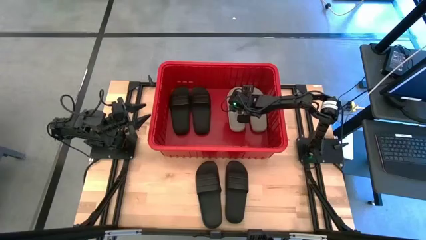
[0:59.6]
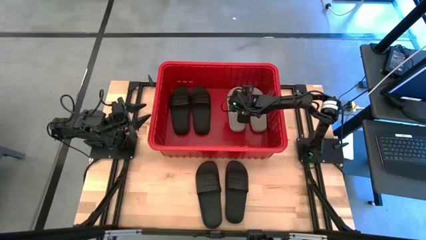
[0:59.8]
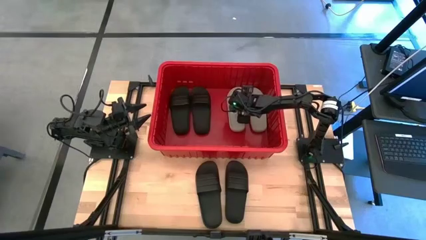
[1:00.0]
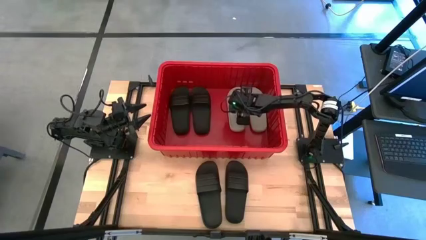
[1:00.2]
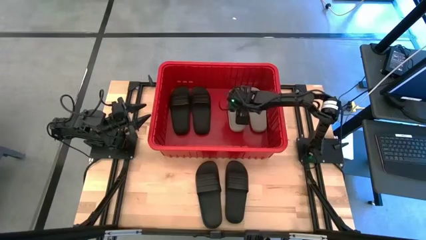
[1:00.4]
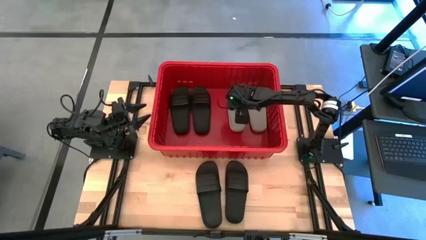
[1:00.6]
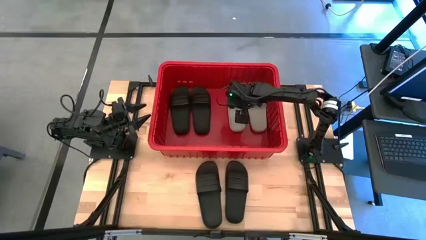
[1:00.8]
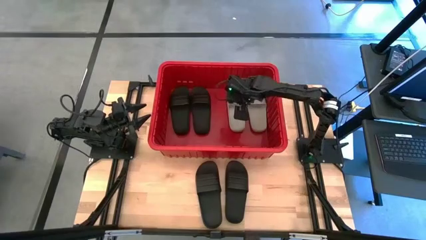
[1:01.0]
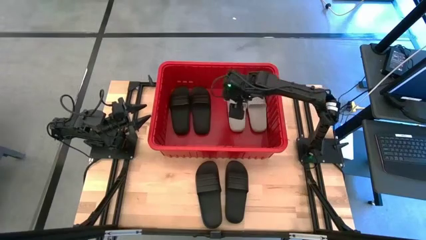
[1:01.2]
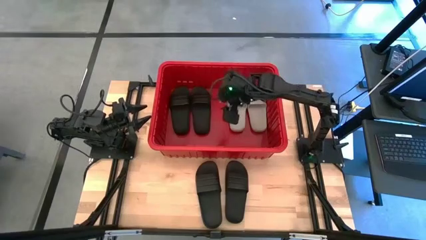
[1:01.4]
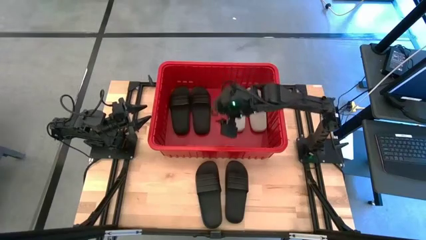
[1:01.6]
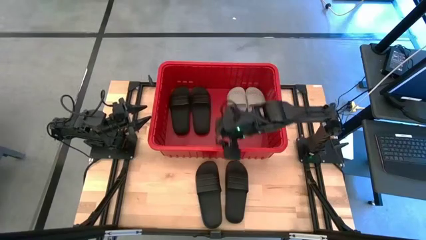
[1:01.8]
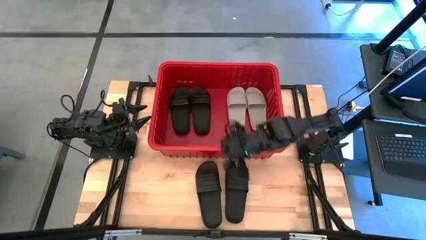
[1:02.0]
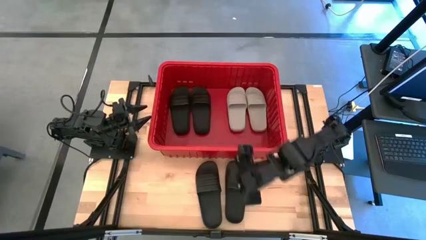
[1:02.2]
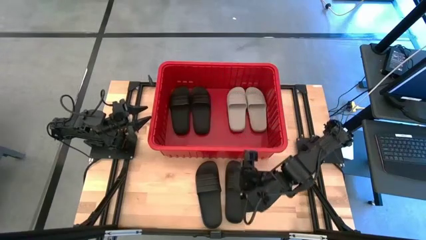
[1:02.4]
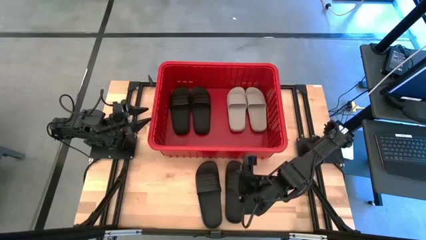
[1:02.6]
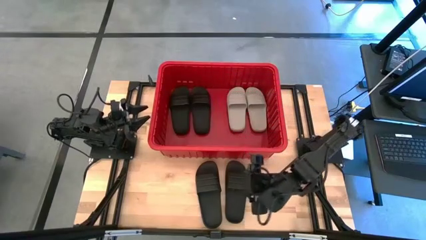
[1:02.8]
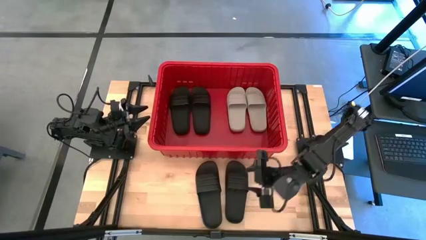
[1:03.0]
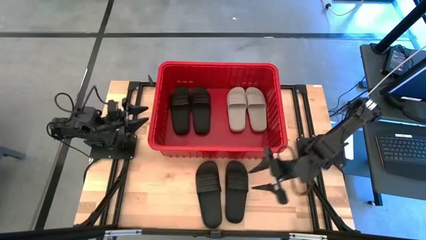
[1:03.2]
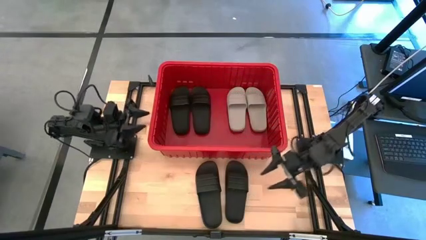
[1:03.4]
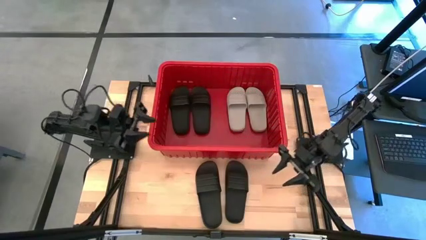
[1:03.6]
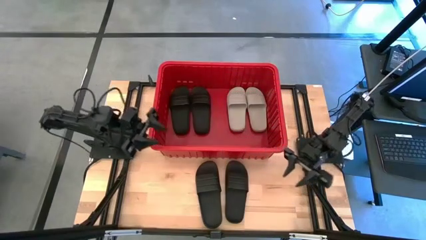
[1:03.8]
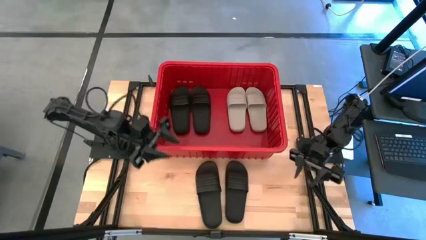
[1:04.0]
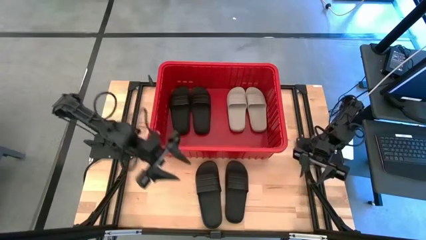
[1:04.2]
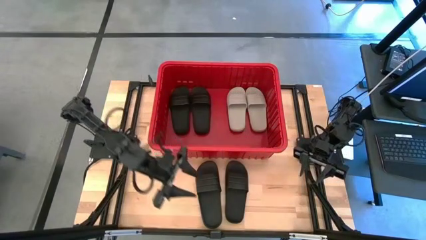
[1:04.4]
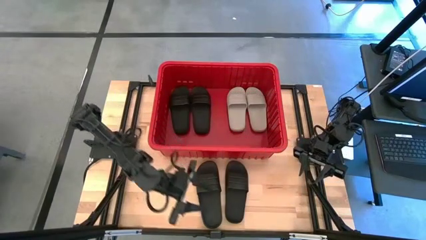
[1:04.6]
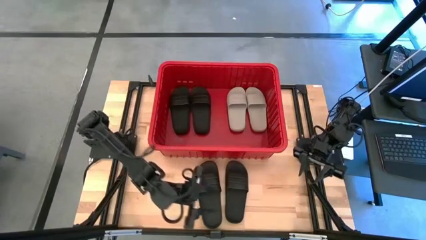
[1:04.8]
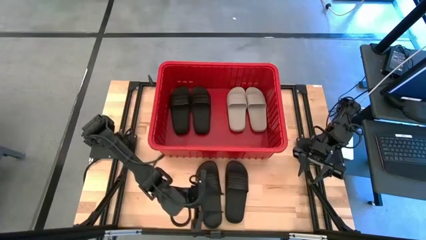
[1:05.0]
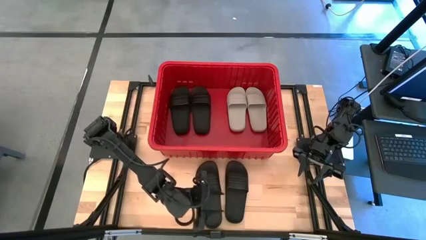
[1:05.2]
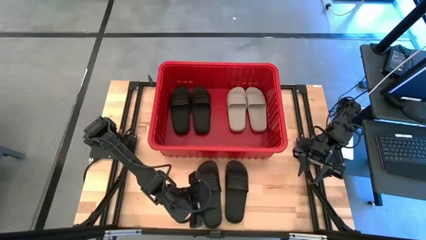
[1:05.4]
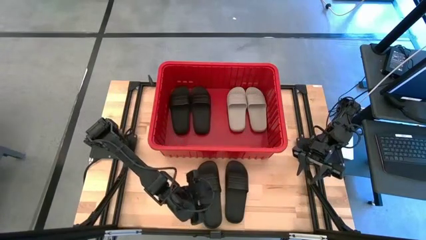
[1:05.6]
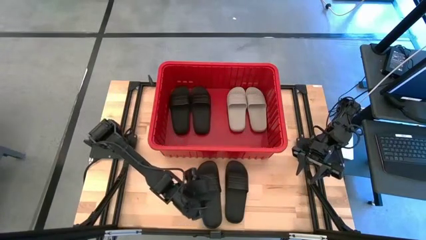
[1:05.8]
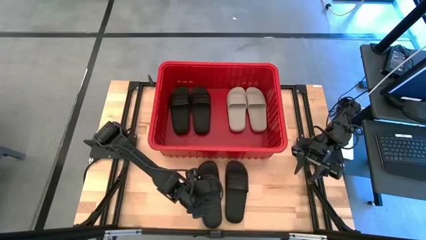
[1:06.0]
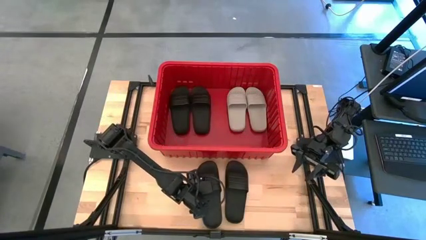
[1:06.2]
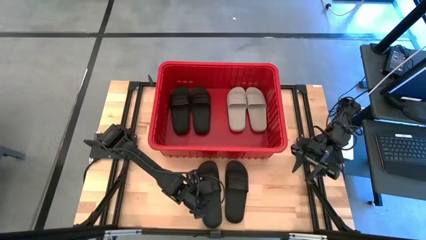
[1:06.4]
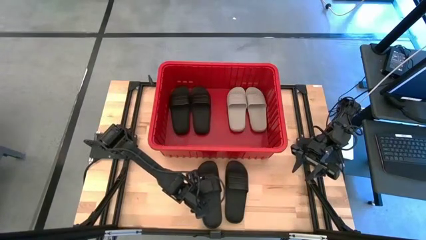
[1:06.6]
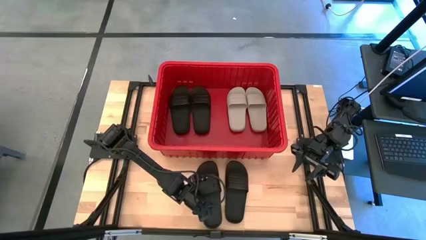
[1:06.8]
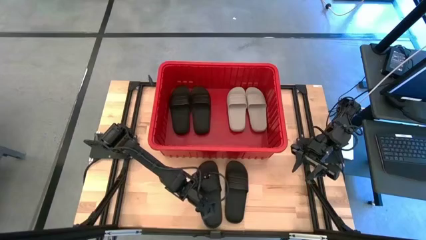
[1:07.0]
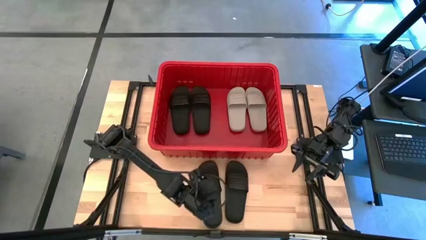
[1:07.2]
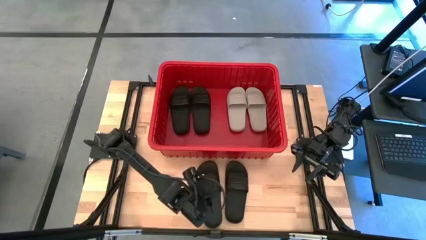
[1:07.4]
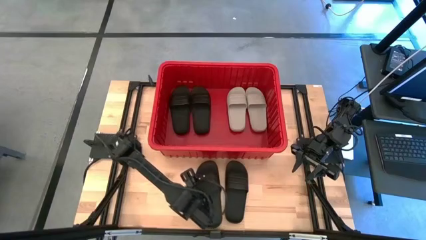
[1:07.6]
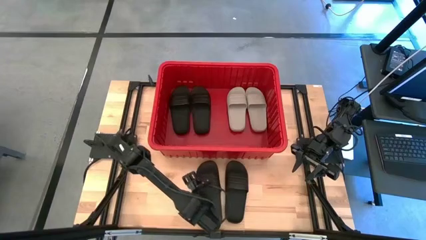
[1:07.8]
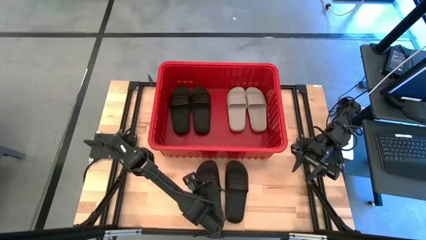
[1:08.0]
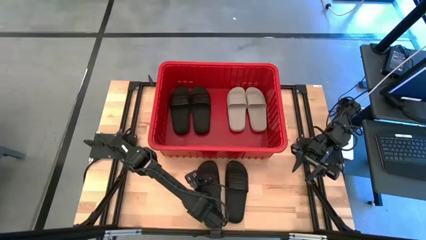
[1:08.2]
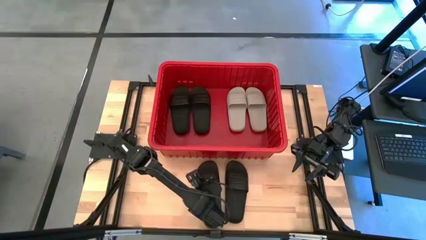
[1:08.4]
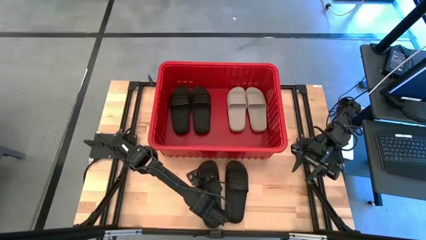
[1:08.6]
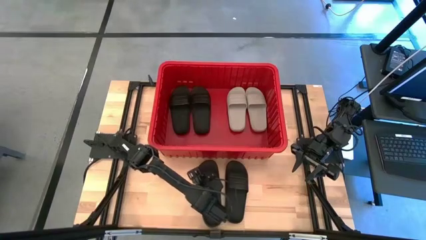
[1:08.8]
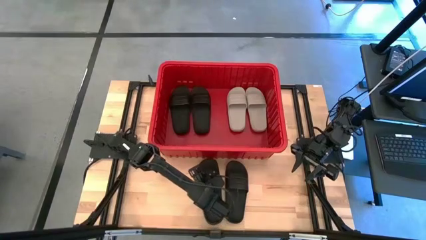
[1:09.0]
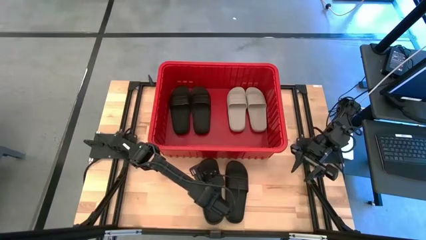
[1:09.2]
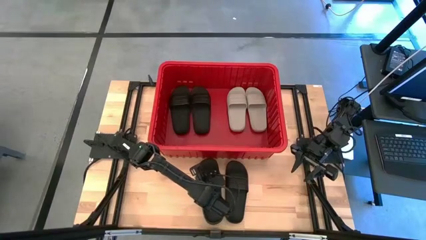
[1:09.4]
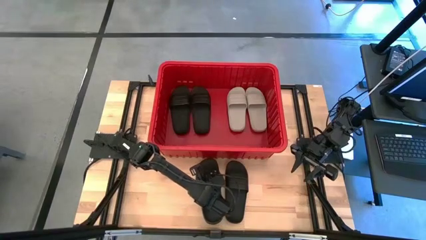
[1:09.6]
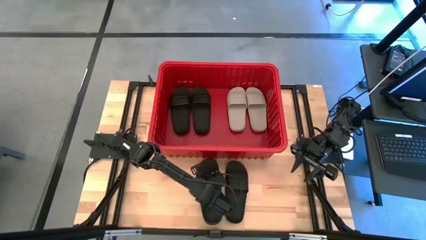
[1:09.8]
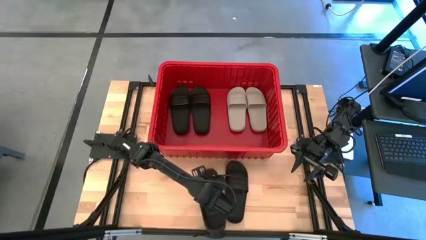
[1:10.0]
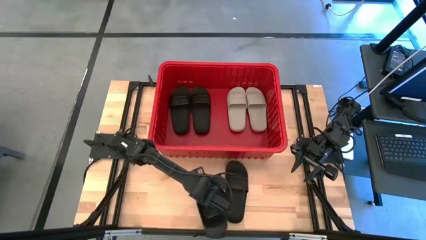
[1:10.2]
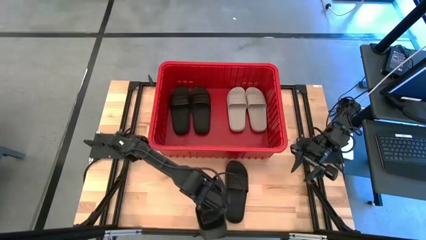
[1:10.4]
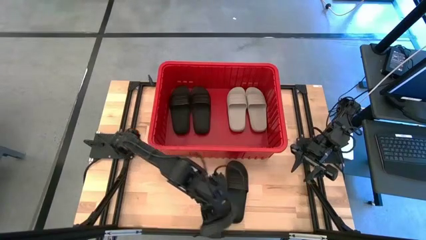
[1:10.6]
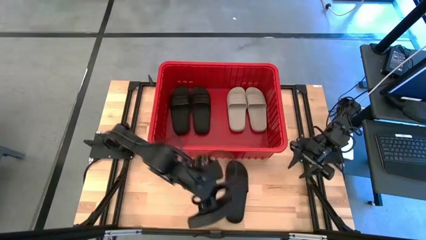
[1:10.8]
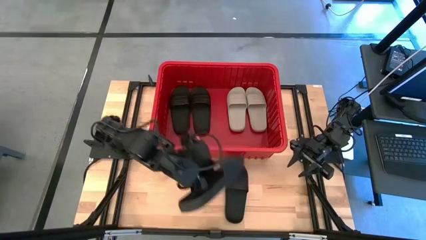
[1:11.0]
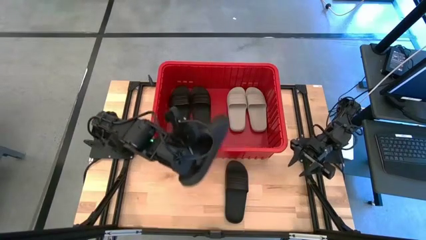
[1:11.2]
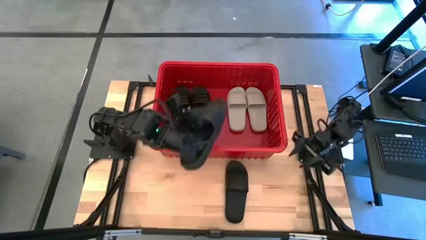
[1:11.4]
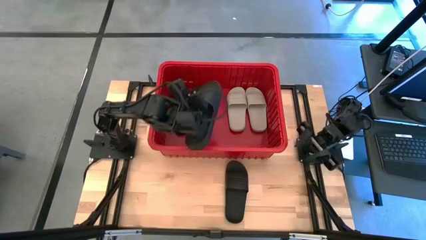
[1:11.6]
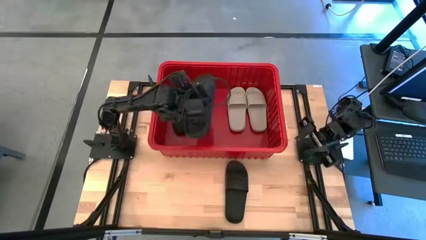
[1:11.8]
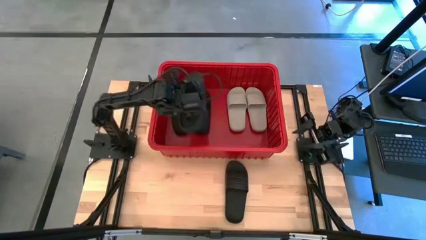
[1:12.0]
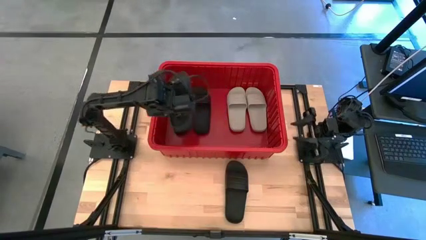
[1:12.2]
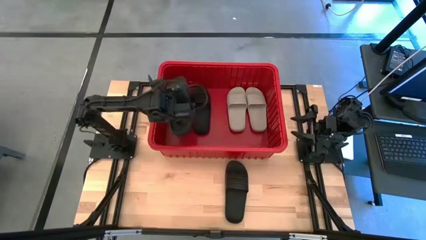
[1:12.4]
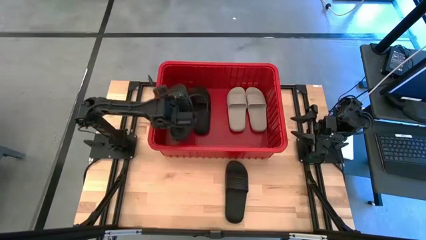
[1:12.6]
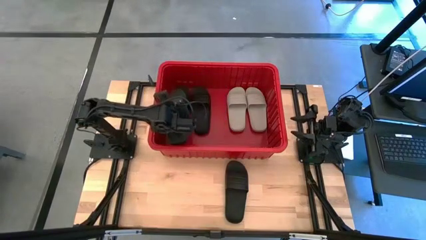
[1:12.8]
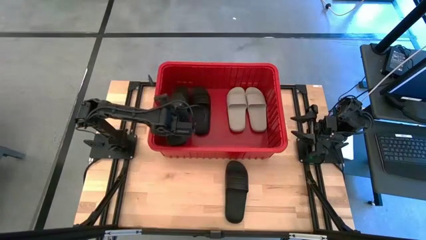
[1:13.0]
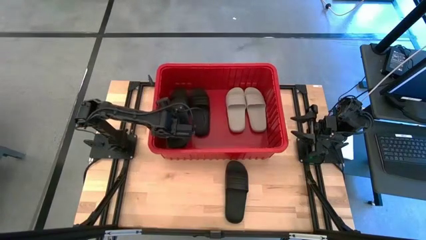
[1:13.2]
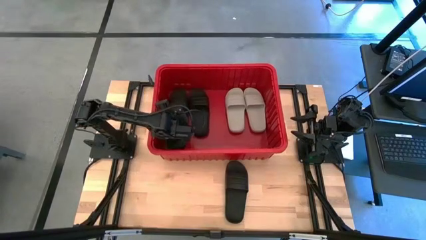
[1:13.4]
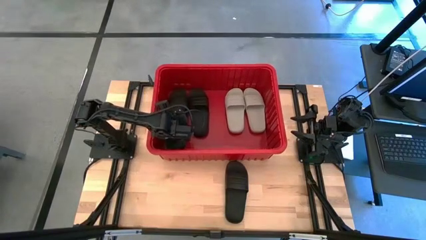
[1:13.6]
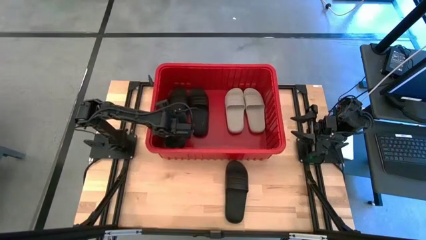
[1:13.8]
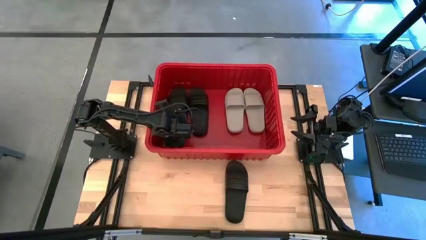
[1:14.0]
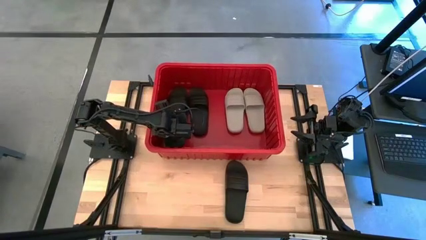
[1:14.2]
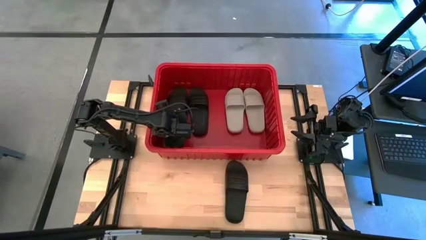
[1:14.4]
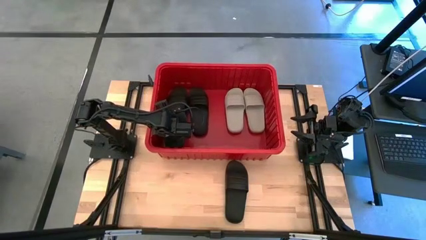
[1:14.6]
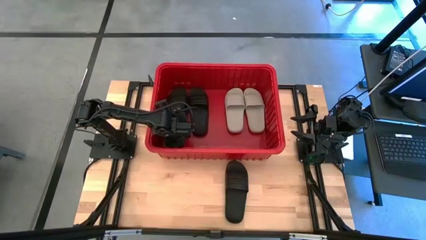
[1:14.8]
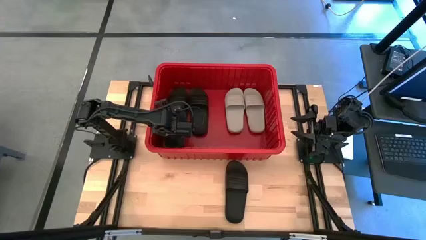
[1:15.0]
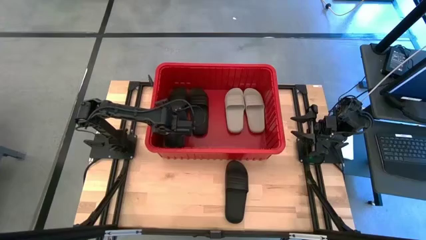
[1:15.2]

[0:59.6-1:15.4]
Task: Pick and place slides into bin
Put the black slide into the red bin

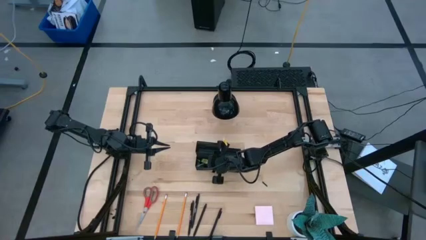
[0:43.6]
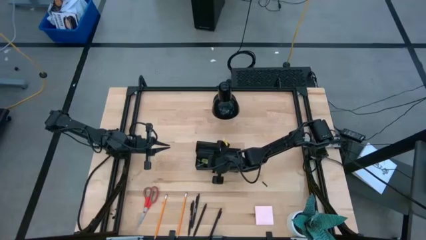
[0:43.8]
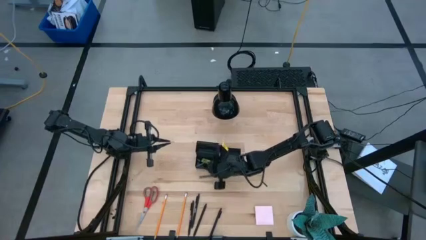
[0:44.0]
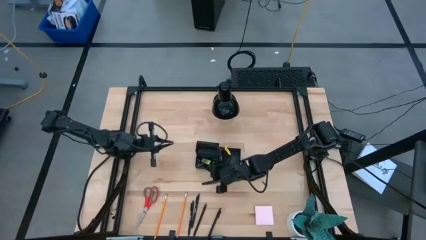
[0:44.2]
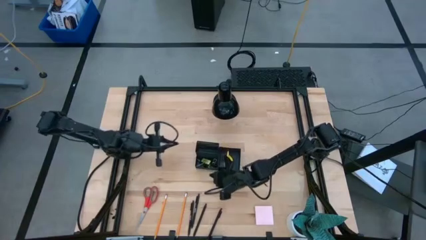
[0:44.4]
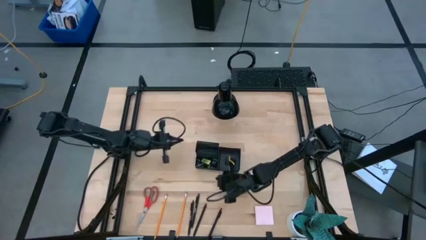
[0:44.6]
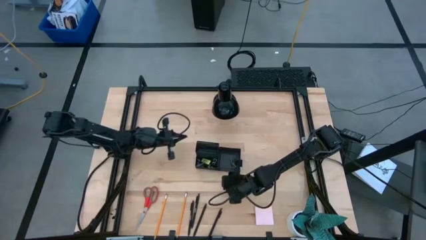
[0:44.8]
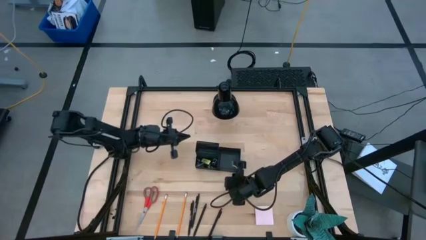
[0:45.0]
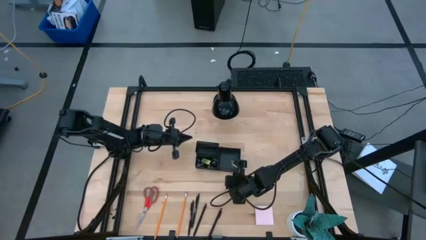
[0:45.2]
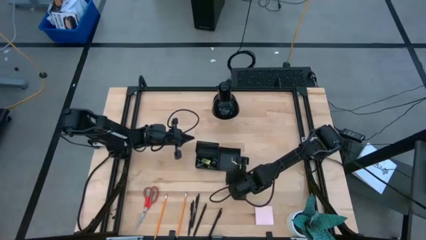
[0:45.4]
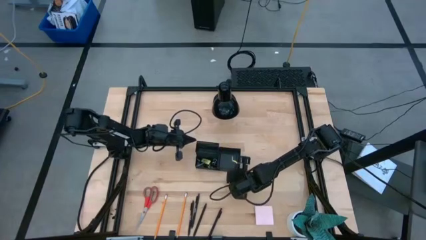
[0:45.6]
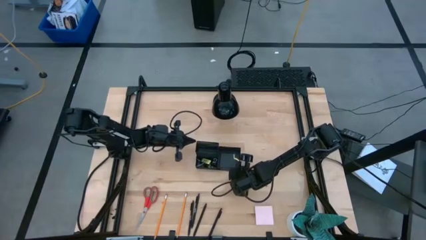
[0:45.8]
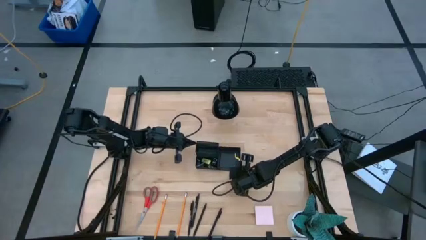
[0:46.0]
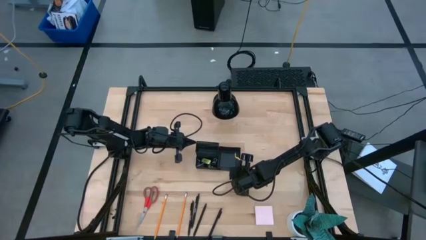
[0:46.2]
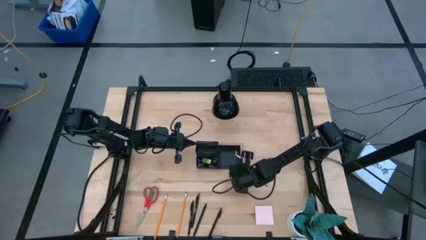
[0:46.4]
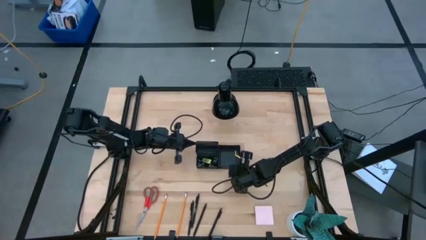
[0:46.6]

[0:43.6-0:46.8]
Task: Pick and place office supplies into organizer
Adjust the desk organizer
